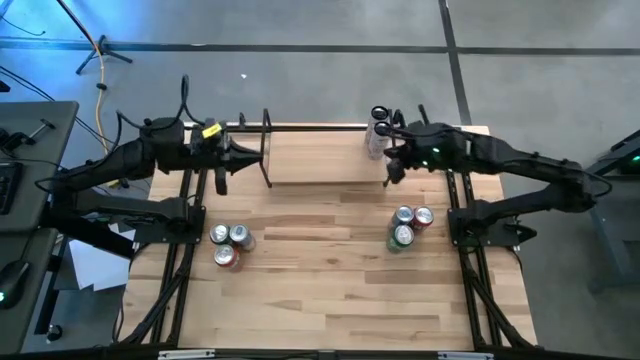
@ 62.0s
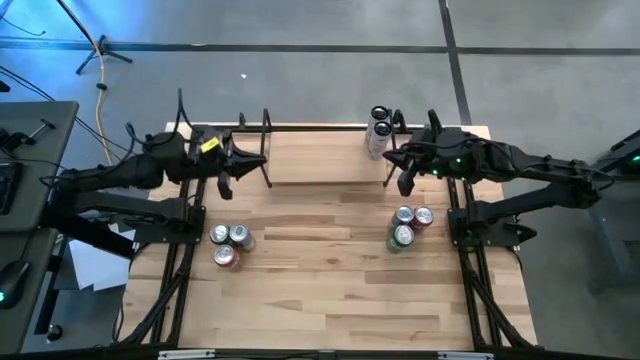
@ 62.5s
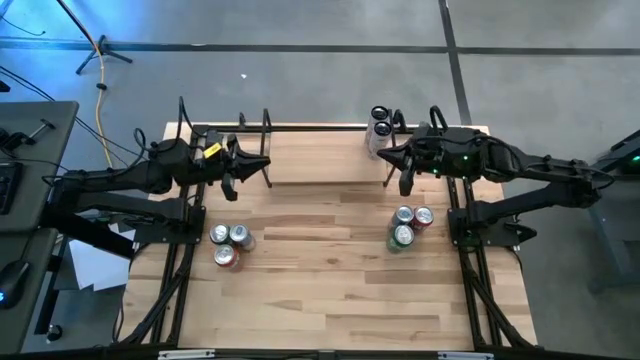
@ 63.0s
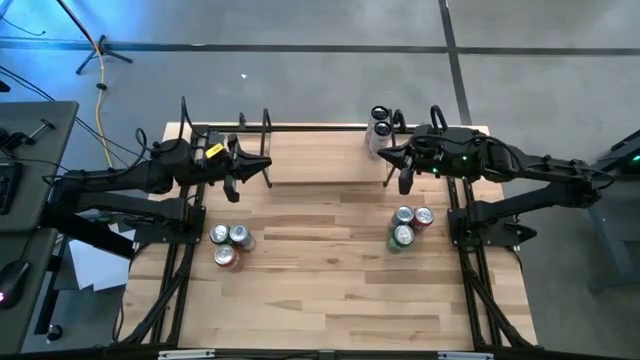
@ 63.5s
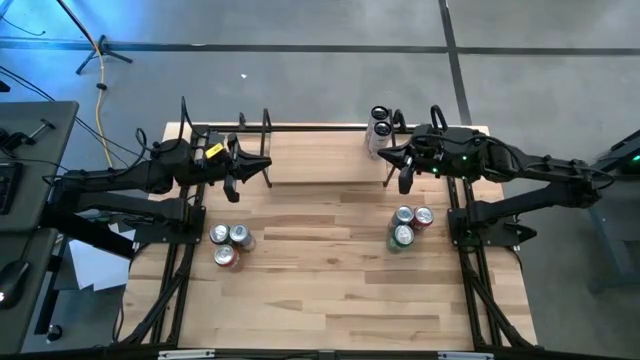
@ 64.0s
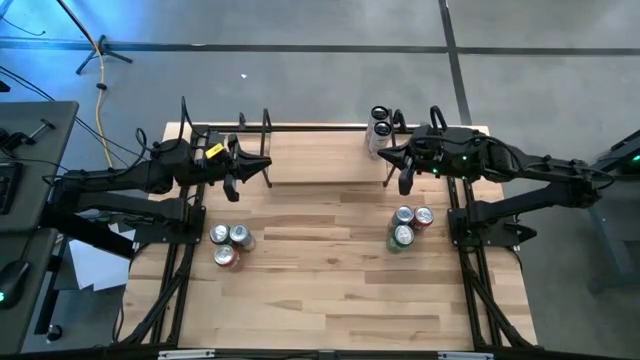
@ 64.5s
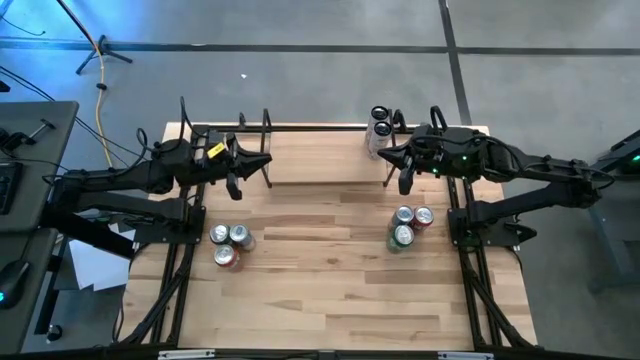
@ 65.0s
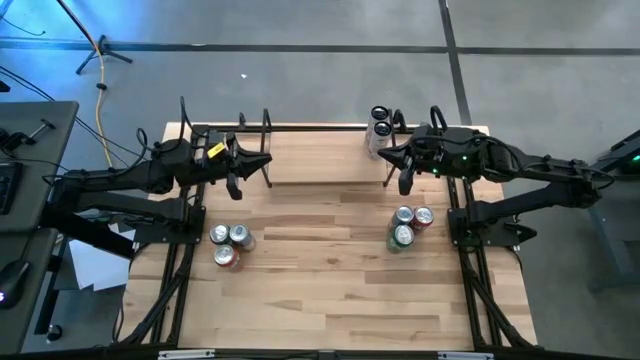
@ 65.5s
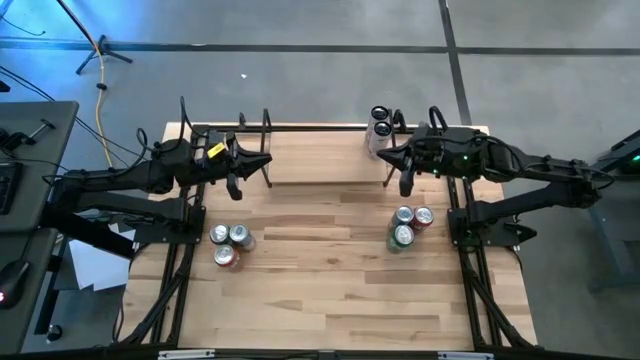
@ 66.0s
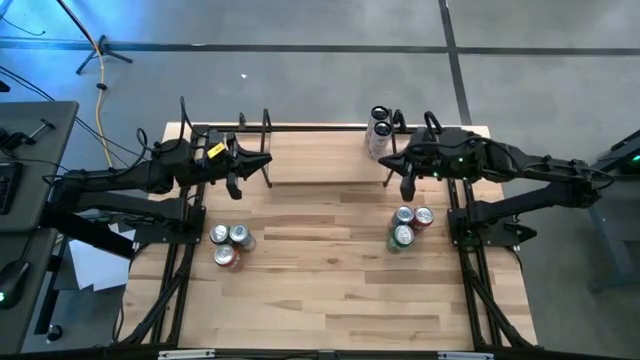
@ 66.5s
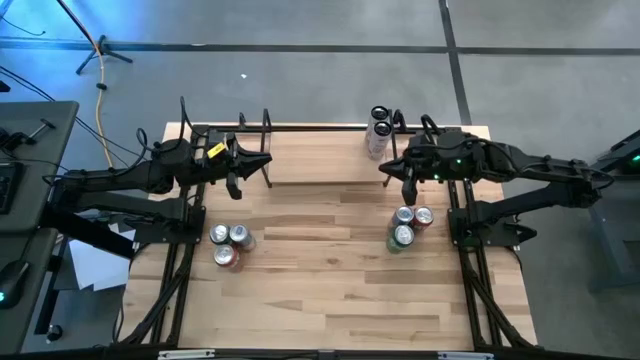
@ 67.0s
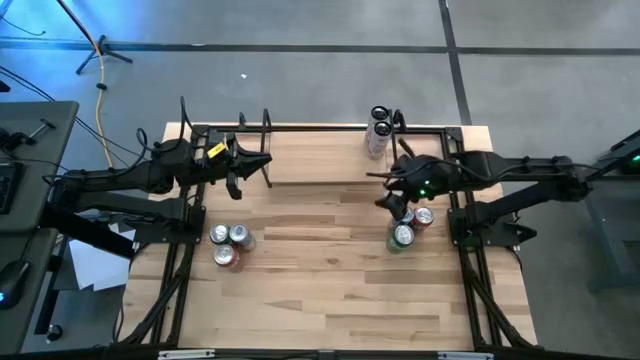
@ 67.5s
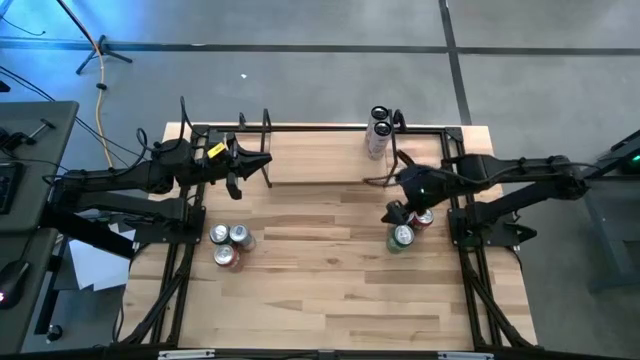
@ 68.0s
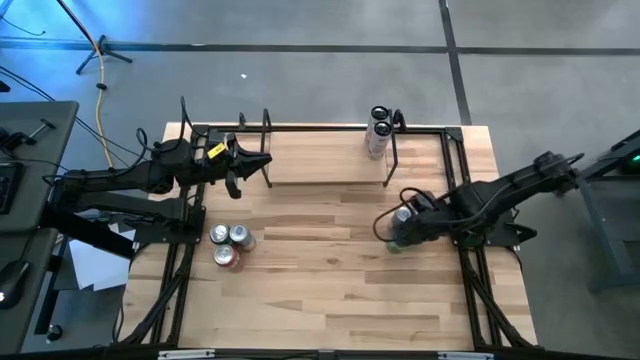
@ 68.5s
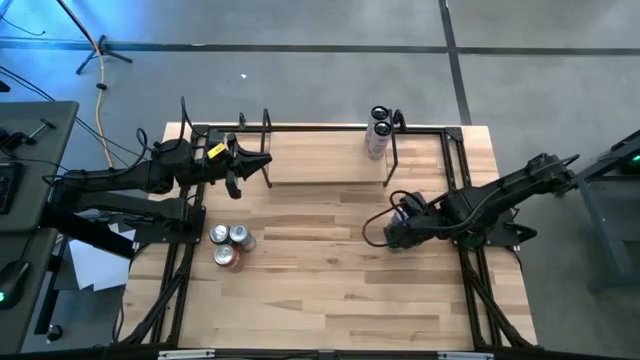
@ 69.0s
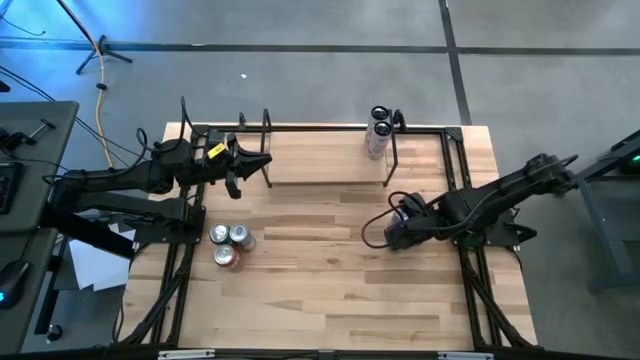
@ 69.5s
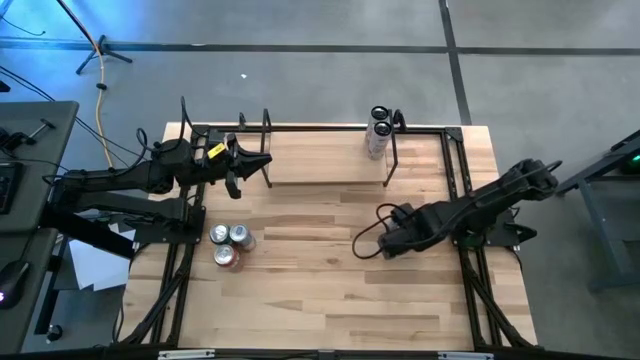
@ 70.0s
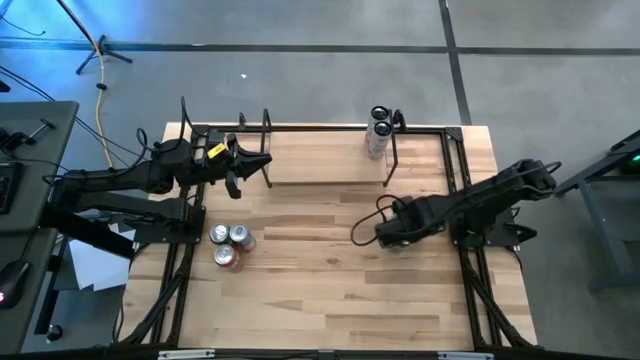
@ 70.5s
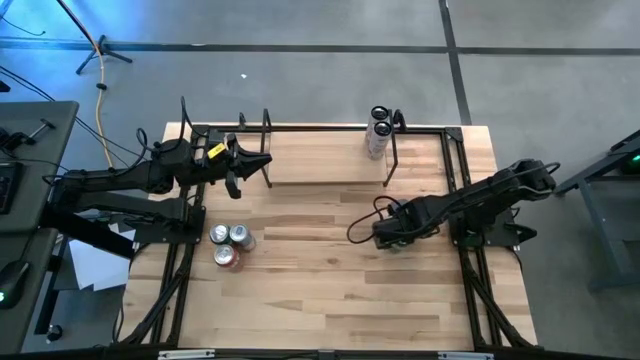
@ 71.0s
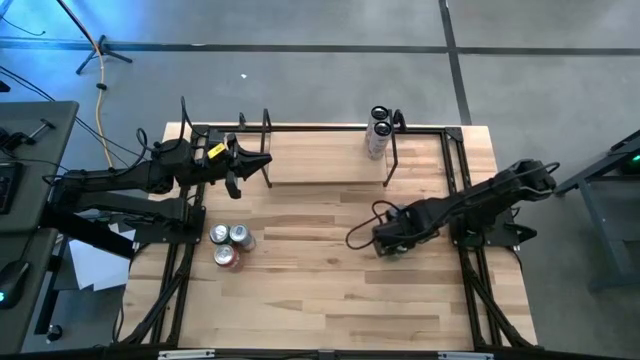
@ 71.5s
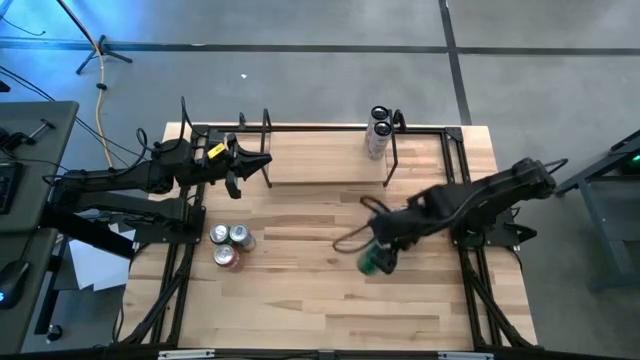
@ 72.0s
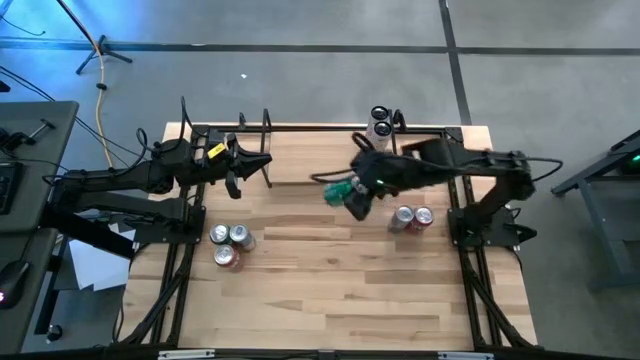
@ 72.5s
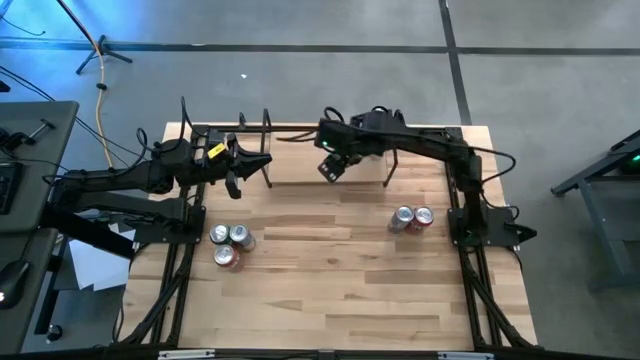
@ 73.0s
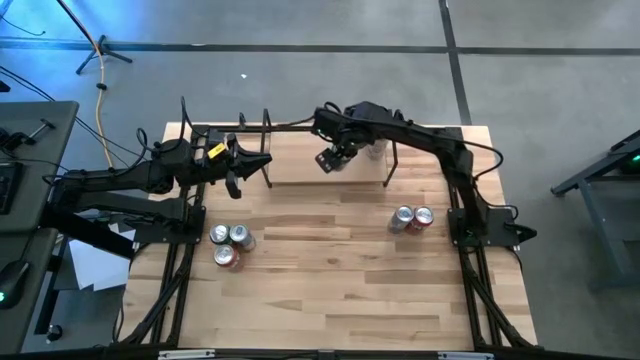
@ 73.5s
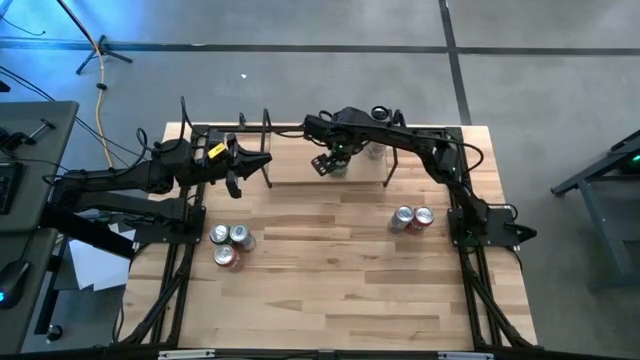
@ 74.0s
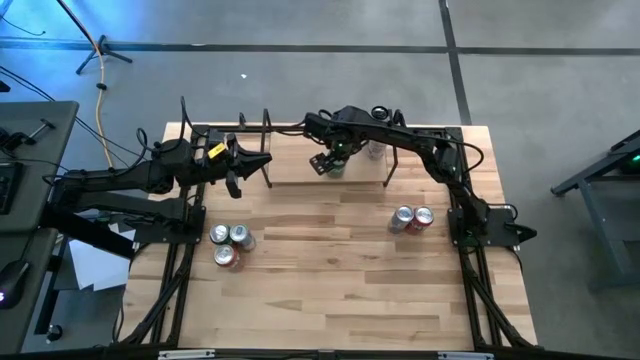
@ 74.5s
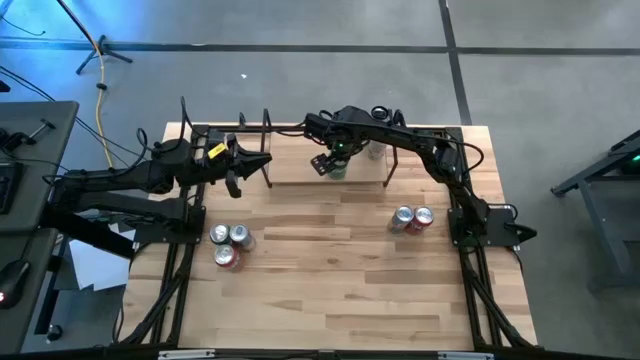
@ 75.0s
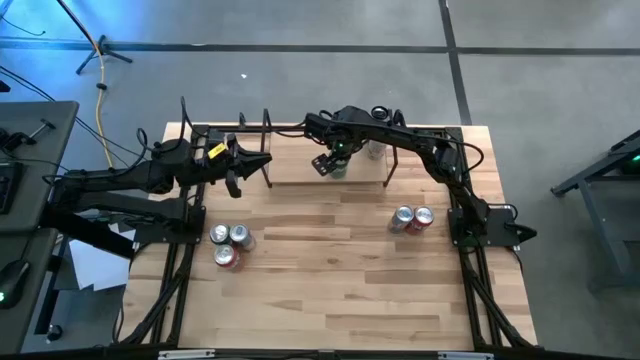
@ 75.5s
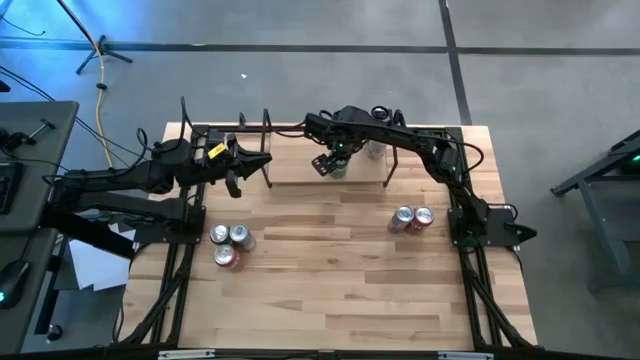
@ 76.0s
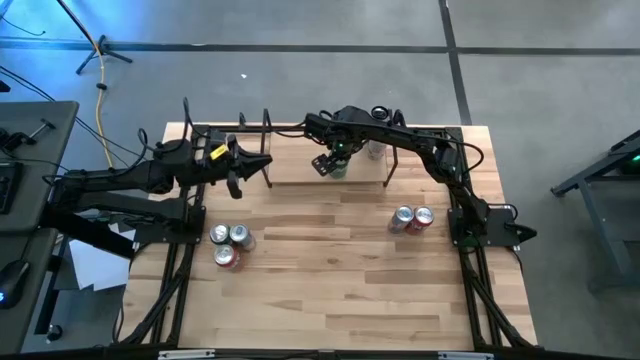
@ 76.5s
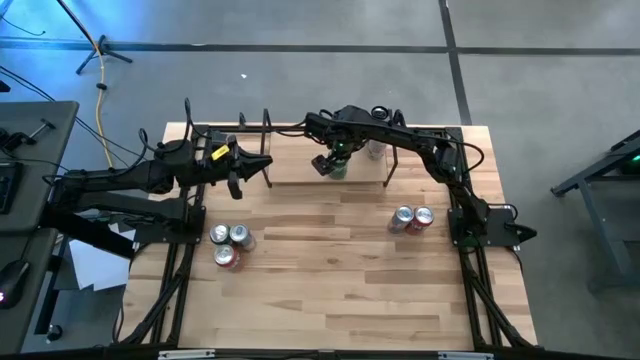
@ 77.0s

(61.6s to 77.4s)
Task: Place canned beverage on shelf
Put the green soda can on the shelf and align it with the other green soda can

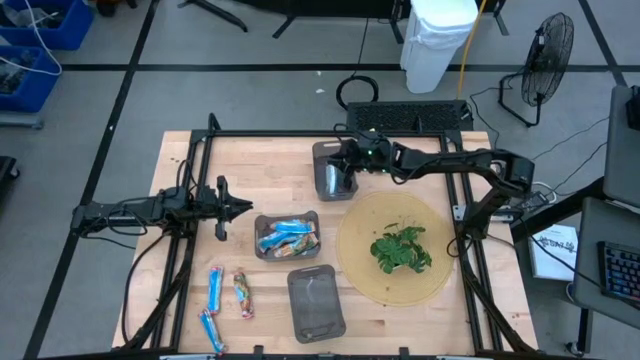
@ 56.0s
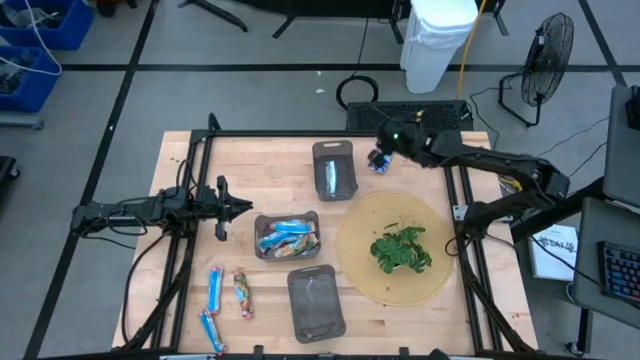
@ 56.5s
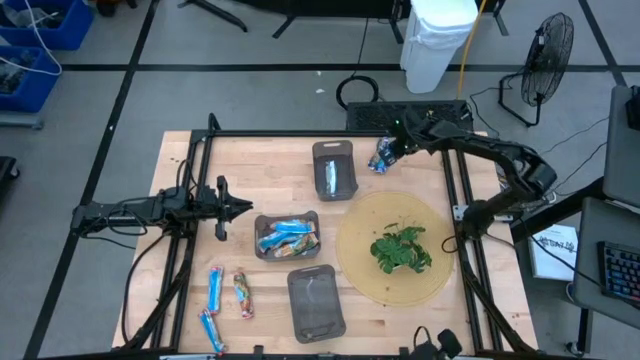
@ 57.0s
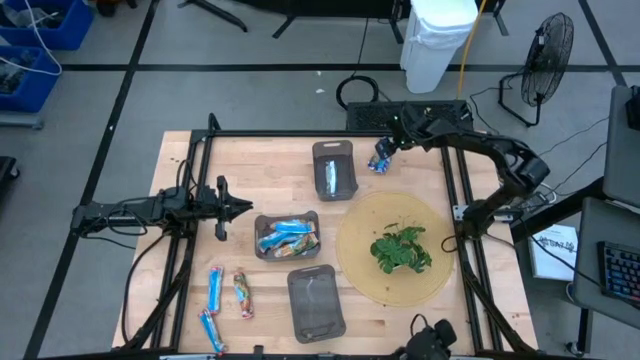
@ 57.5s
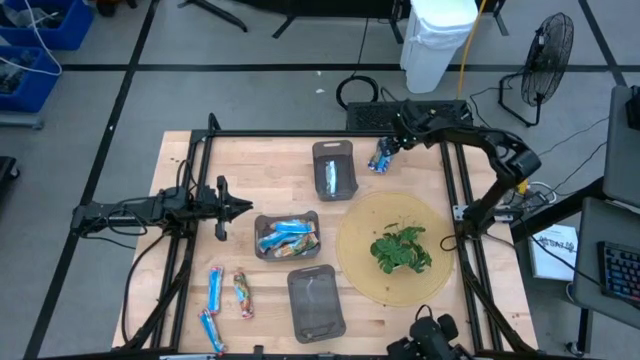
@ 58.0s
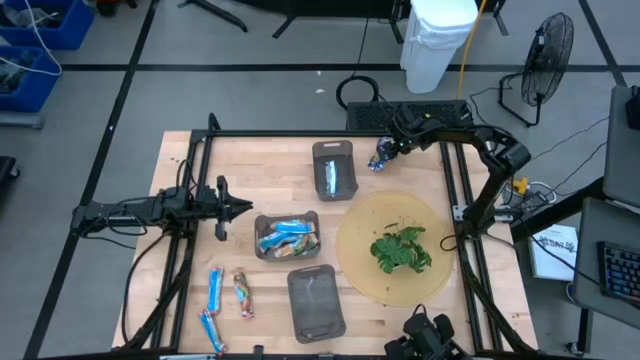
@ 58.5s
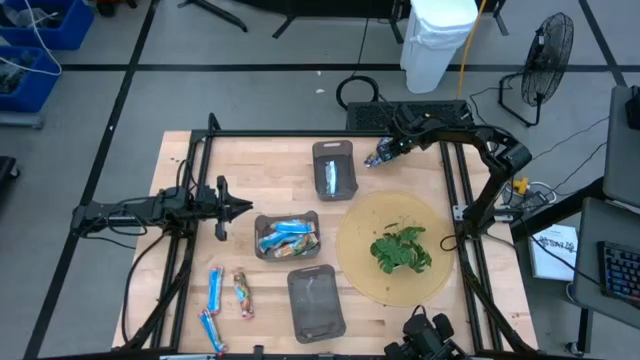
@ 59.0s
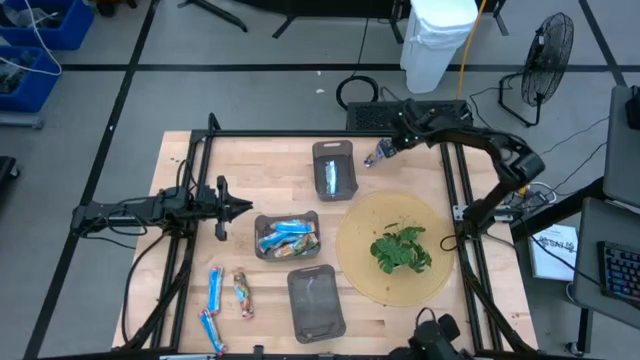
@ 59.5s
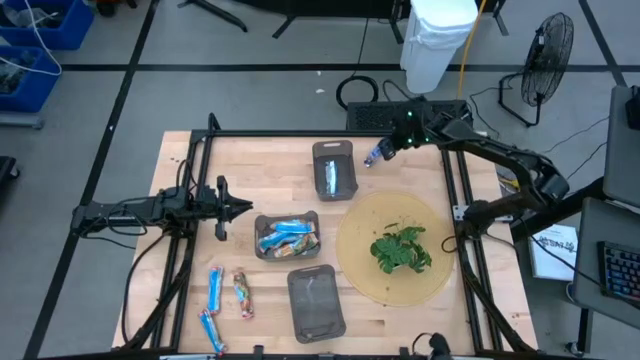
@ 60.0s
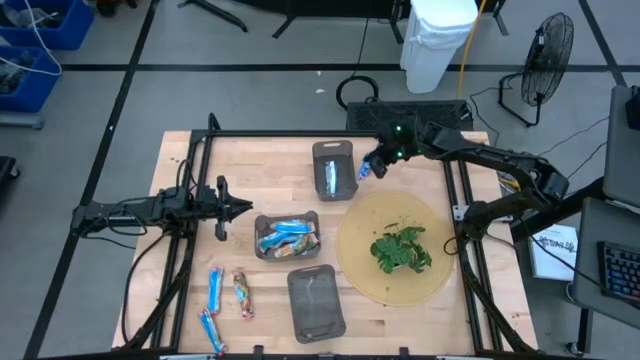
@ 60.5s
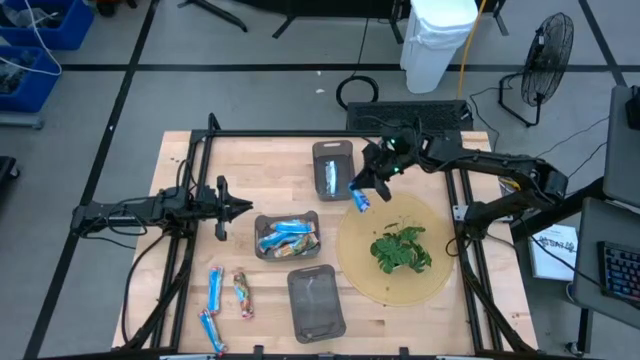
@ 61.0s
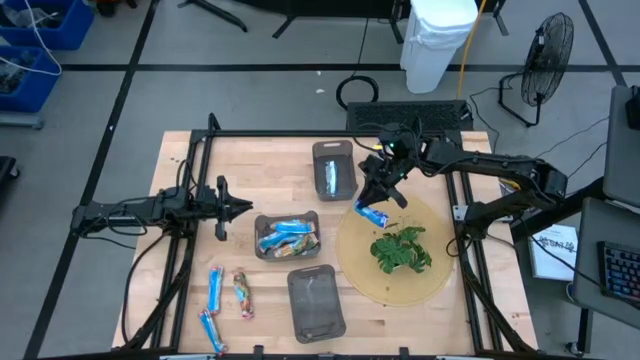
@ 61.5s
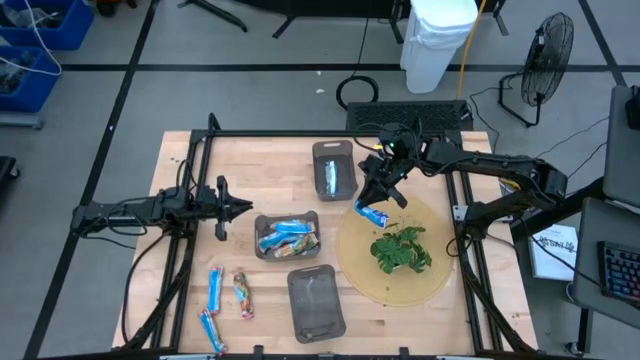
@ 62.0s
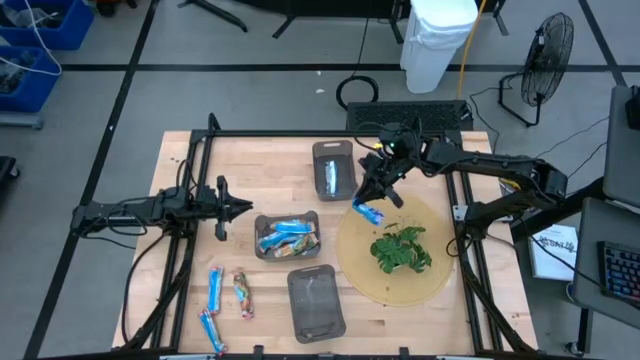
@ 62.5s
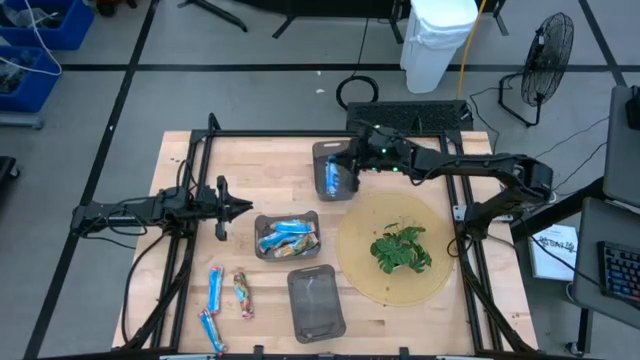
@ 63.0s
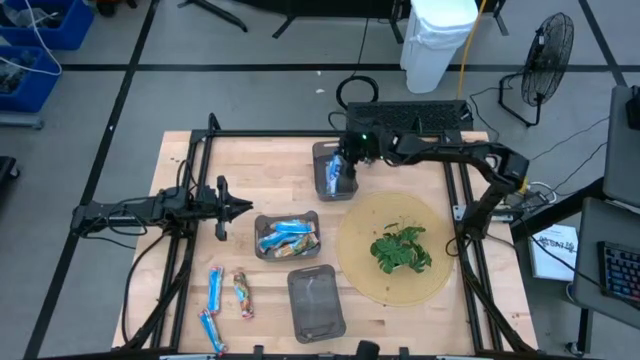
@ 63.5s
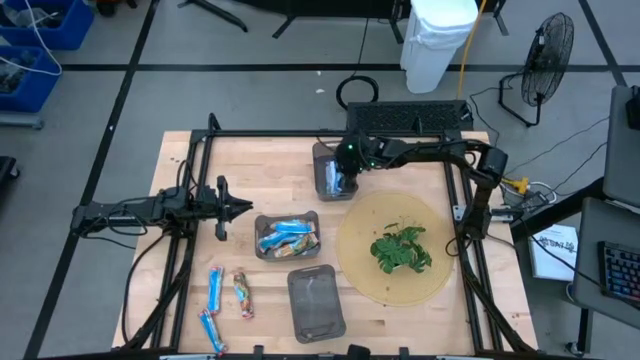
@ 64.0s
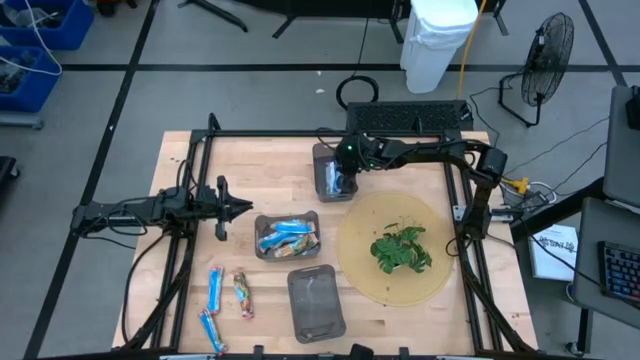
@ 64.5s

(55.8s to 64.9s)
Task: Pick and place Granola Bars by type
Put the blue granola bar into the top black bin
